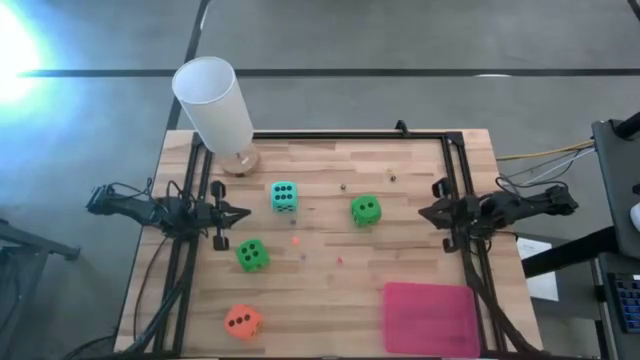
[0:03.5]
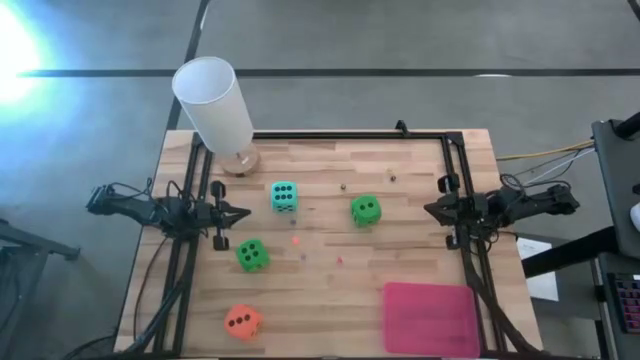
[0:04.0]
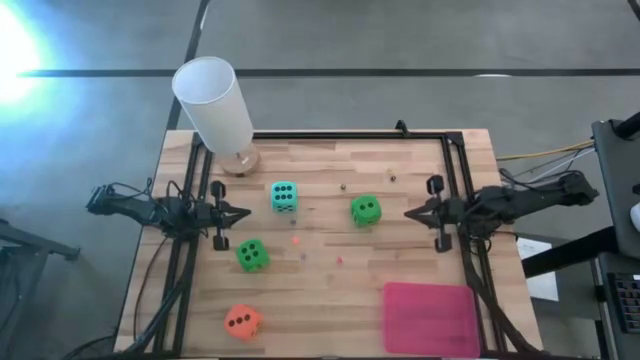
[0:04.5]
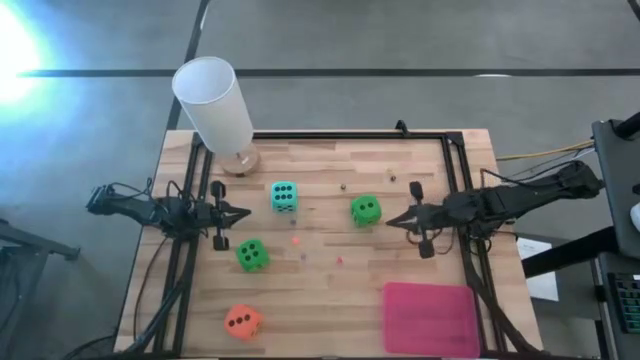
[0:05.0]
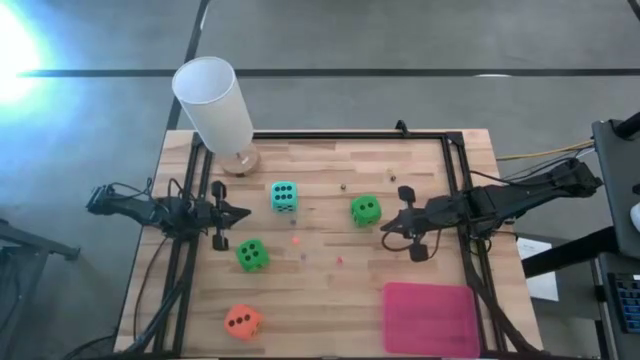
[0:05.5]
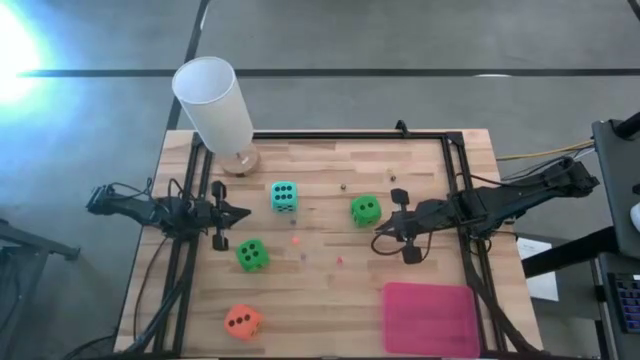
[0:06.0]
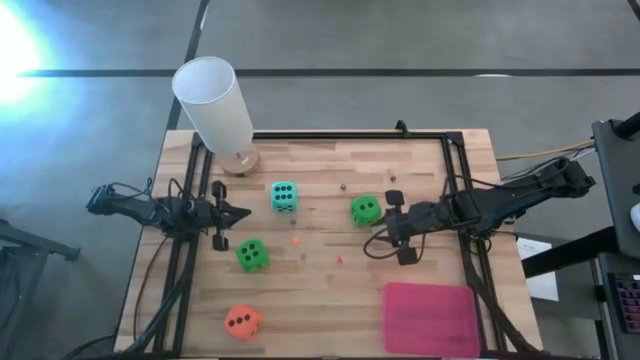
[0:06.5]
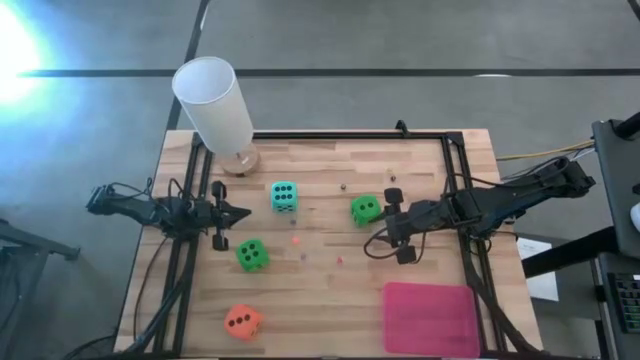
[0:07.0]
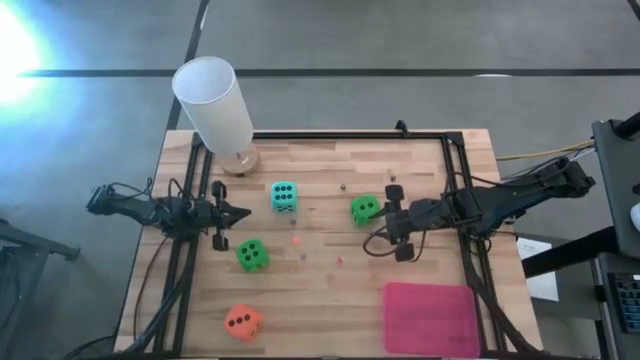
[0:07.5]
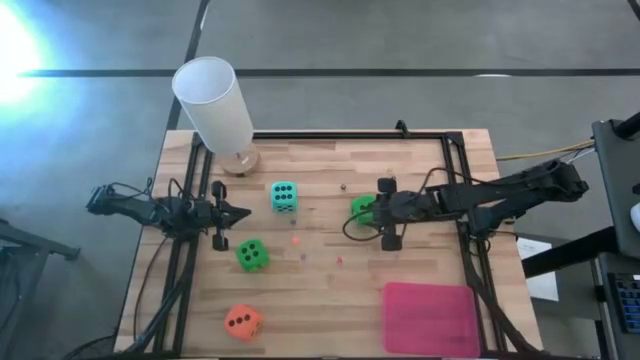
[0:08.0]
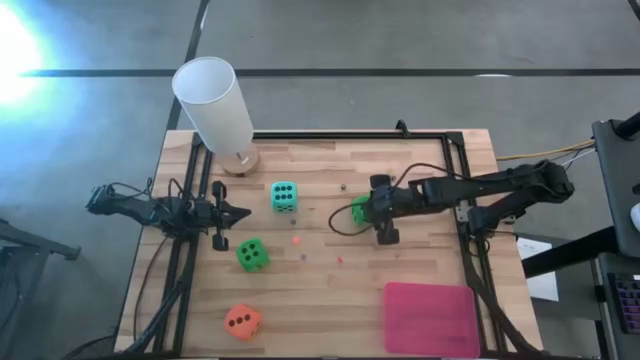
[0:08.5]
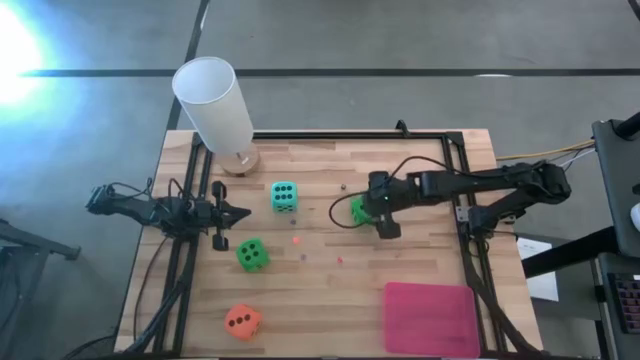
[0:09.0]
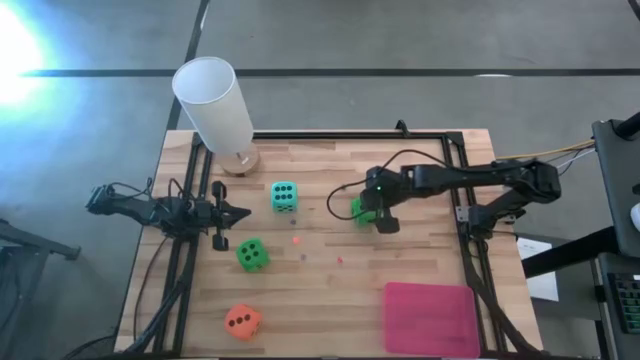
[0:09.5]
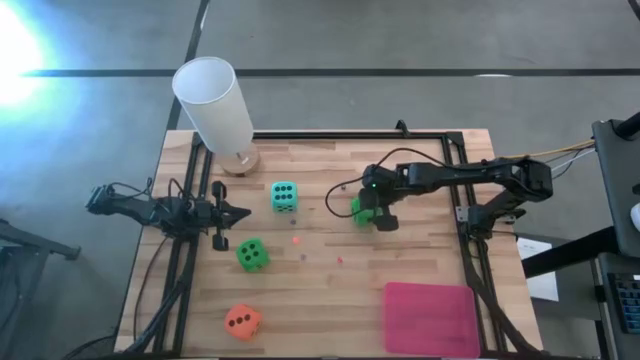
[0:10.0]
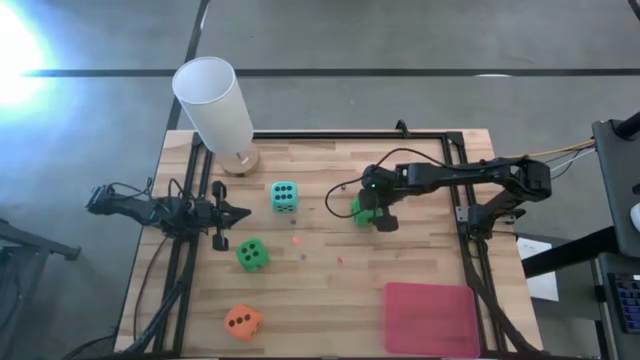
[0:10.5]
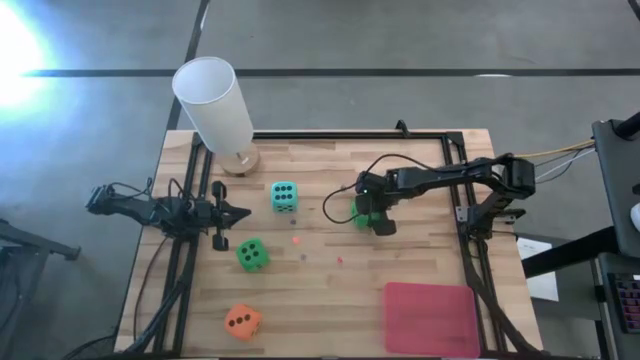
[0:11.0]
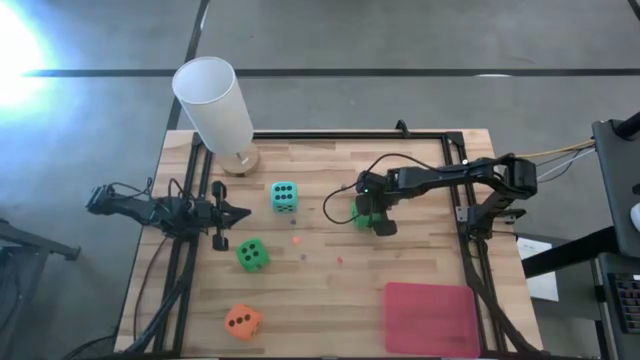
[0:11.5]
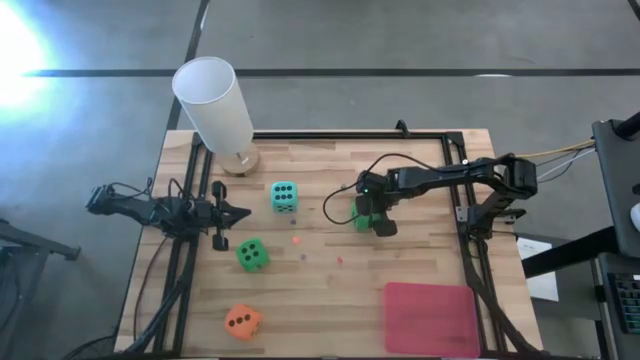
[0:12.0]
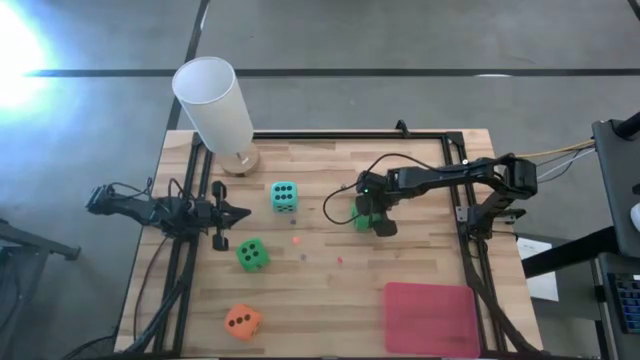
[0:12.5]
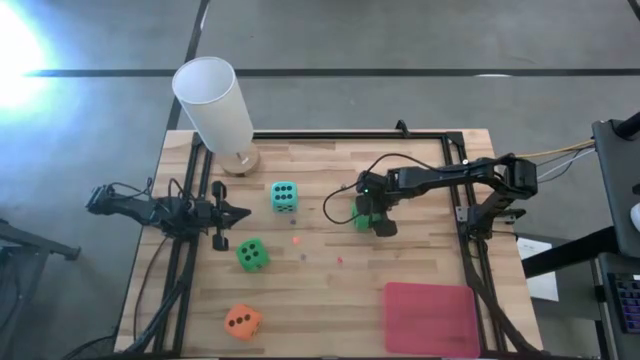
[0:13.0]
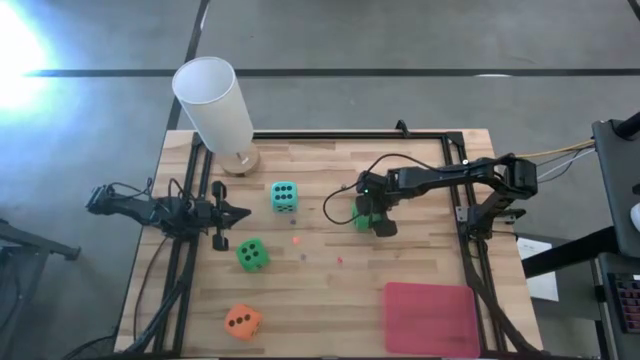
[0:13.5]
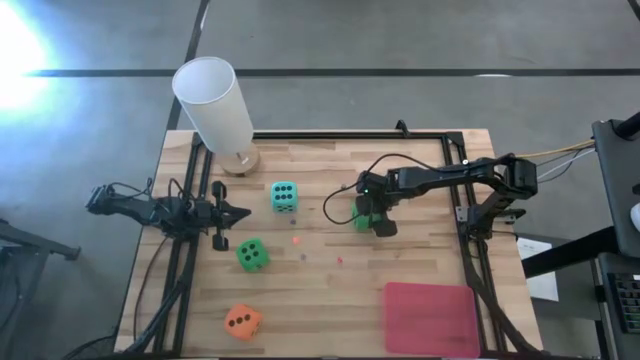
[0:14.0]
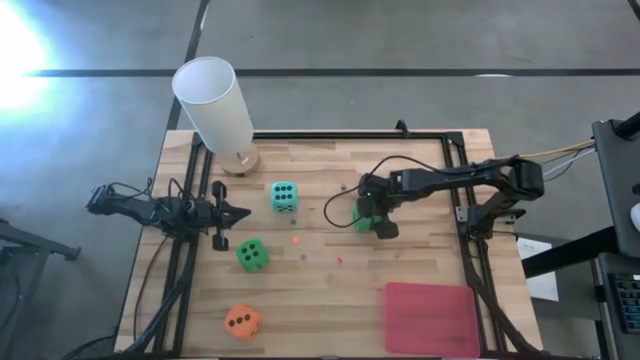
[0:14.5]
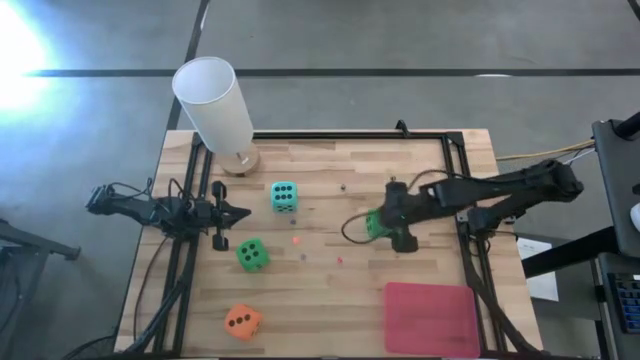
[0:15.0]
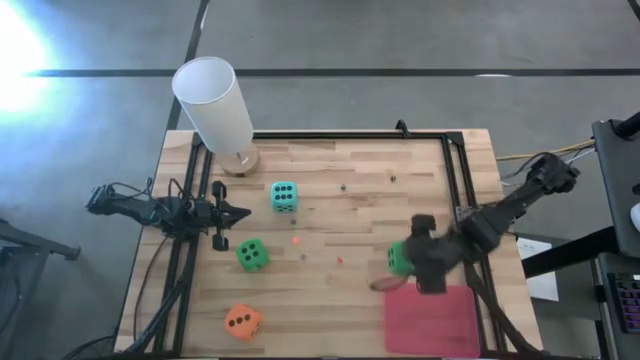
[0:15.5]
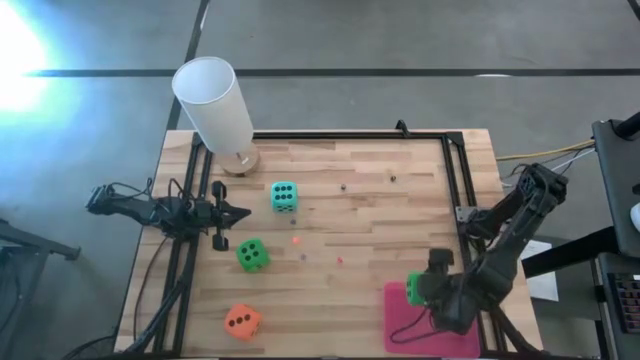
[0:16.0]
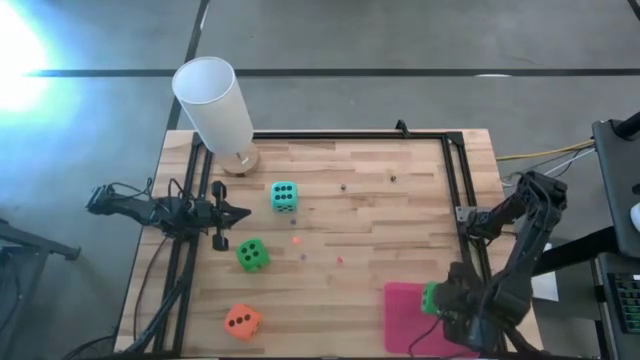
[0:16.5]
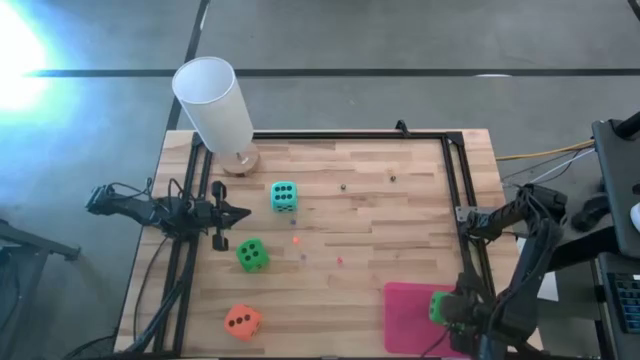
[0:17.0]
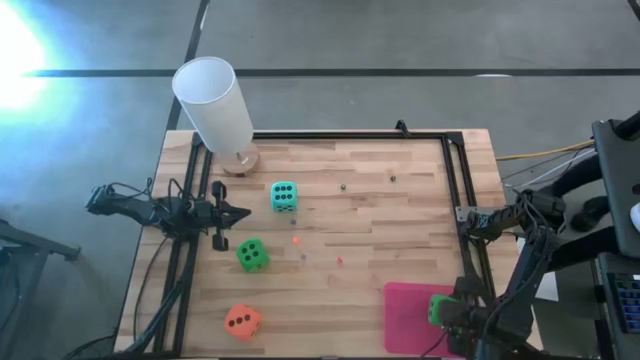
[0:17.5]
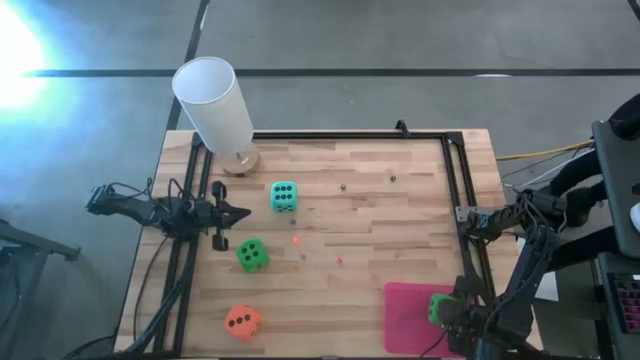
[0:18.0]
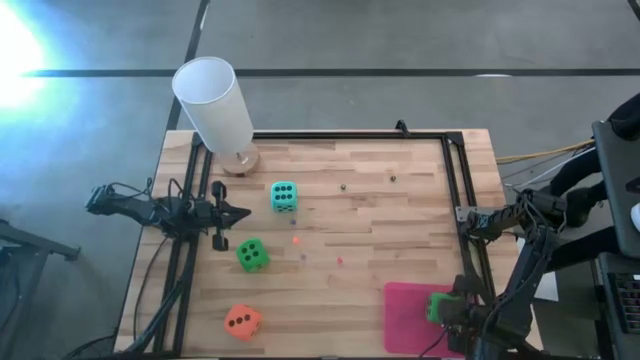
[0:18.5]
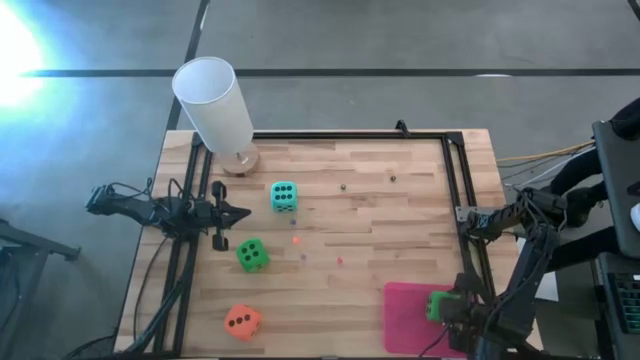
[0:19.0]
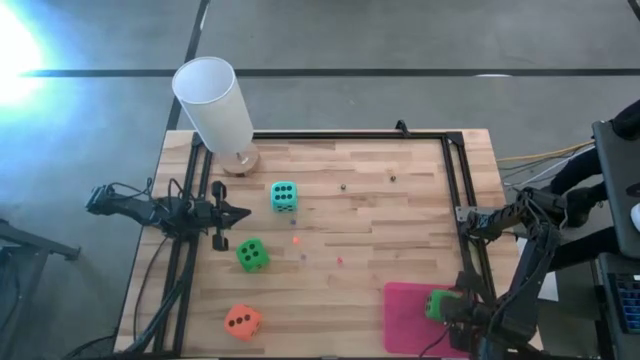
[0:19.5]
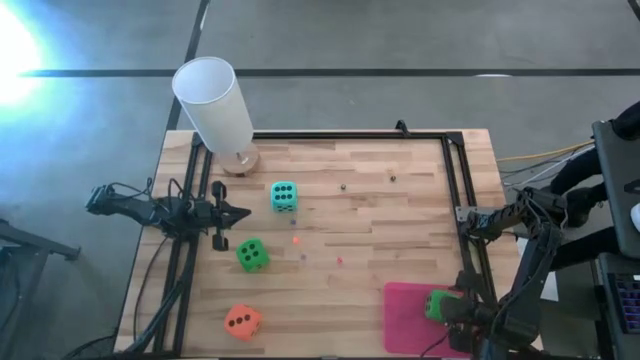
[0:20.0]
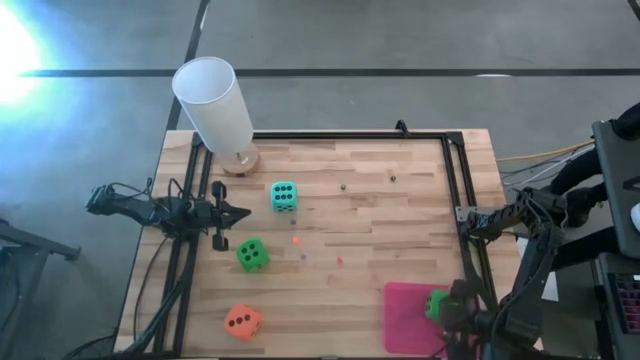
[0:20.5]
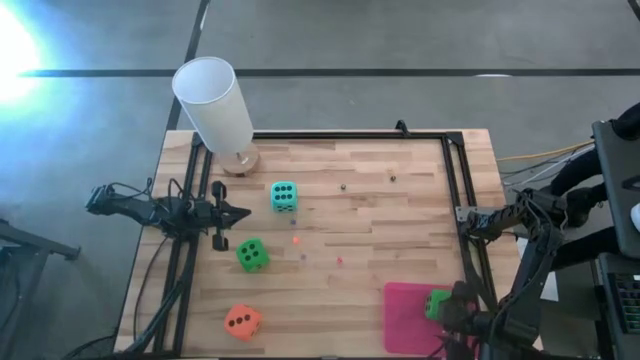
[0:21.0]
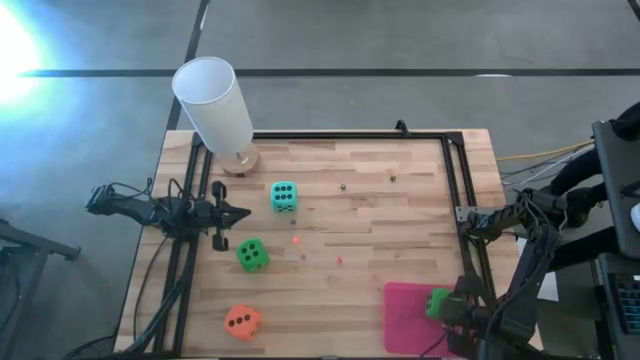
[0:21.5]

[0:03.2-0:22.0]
Task: Pick & Place Dice
Put the right large green die into the bin
